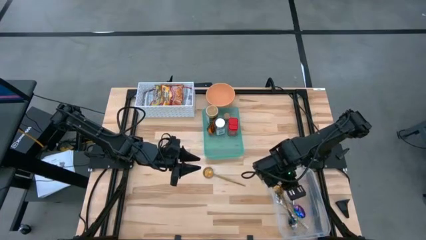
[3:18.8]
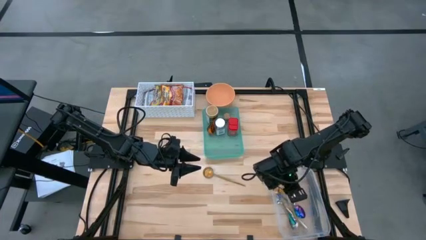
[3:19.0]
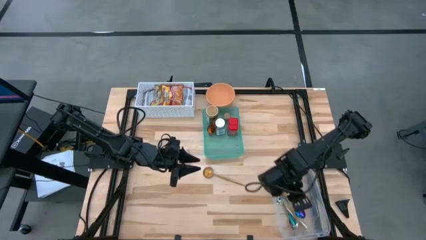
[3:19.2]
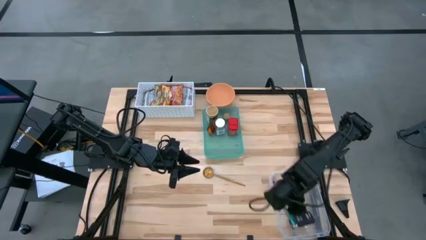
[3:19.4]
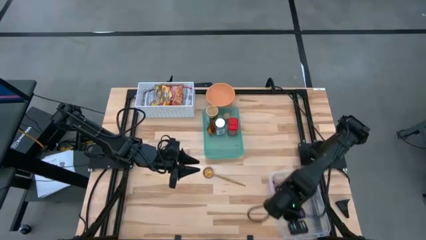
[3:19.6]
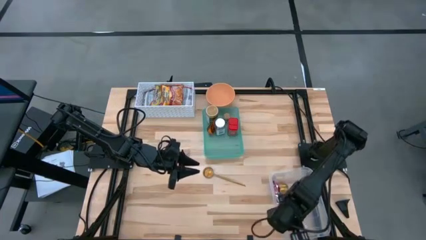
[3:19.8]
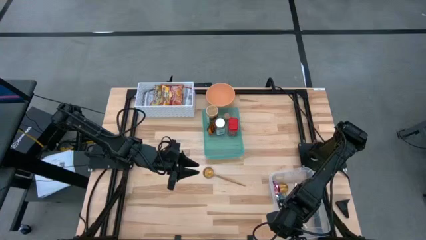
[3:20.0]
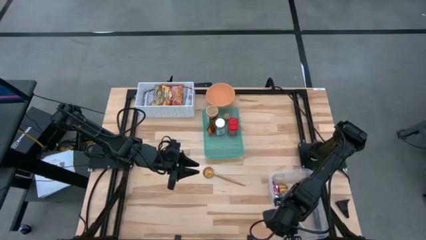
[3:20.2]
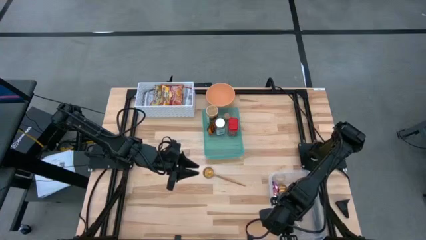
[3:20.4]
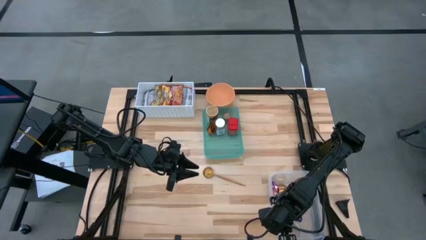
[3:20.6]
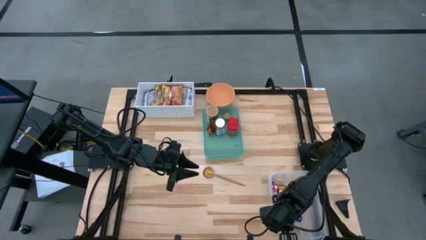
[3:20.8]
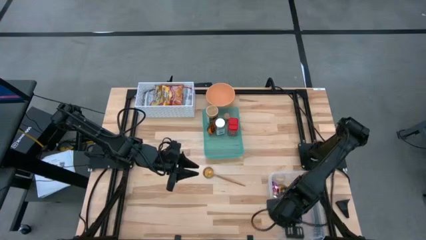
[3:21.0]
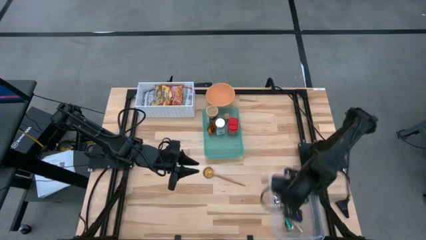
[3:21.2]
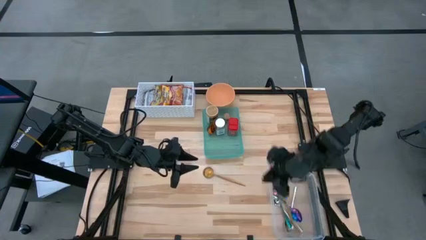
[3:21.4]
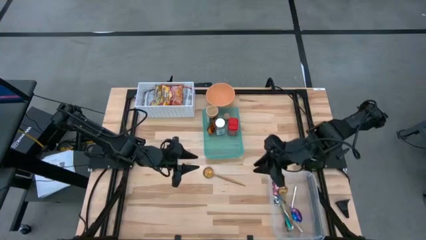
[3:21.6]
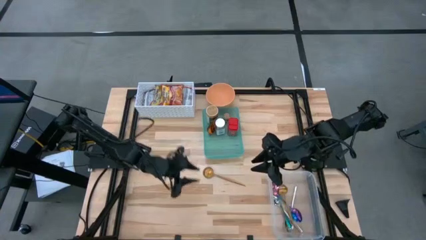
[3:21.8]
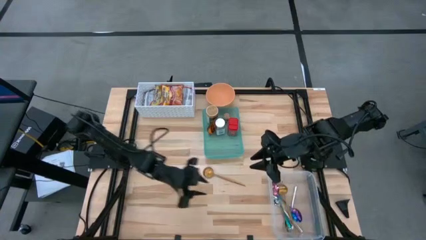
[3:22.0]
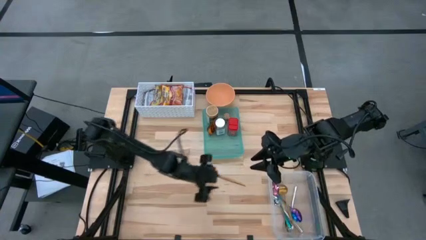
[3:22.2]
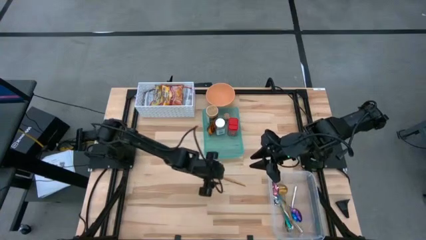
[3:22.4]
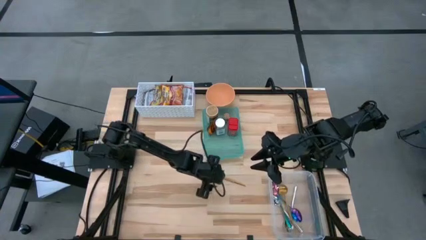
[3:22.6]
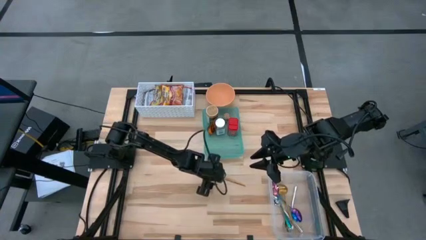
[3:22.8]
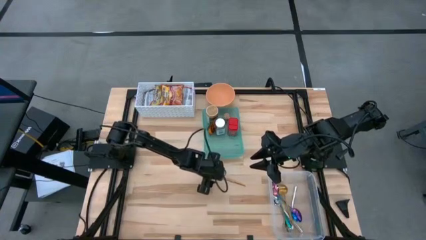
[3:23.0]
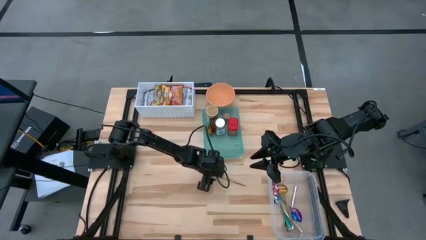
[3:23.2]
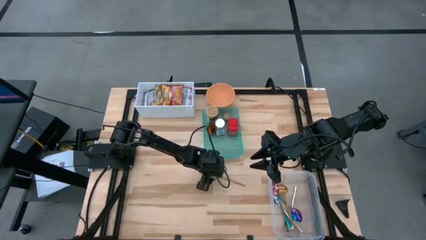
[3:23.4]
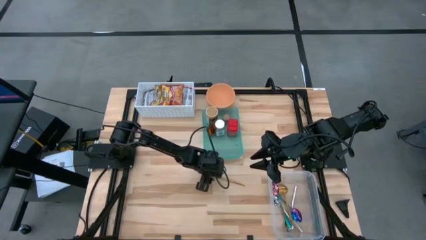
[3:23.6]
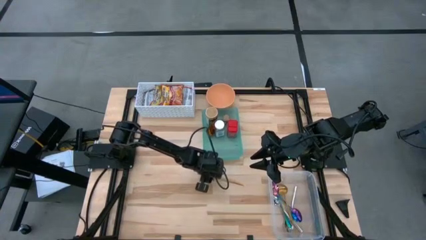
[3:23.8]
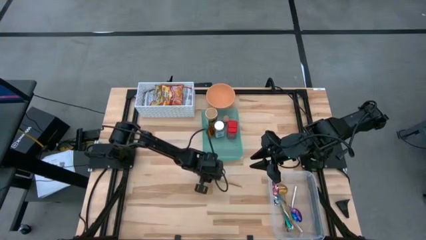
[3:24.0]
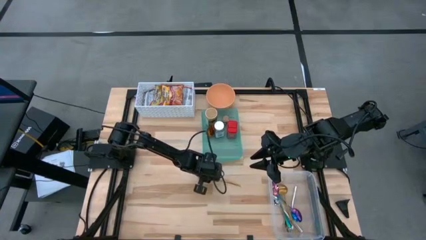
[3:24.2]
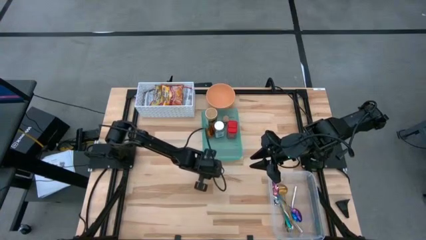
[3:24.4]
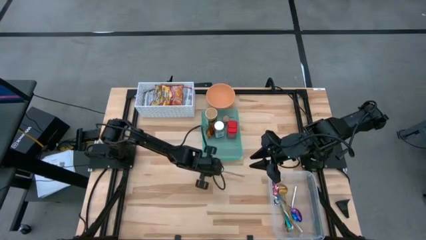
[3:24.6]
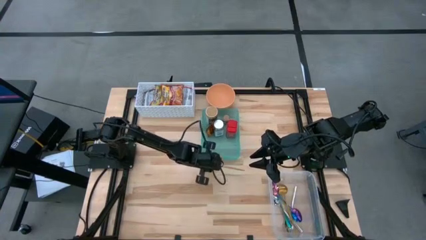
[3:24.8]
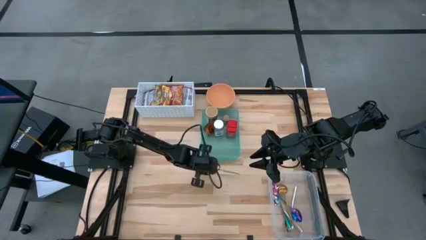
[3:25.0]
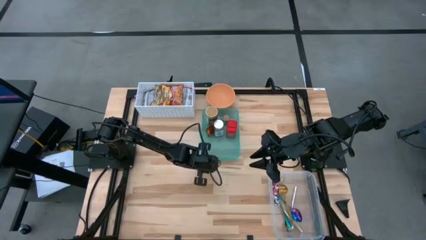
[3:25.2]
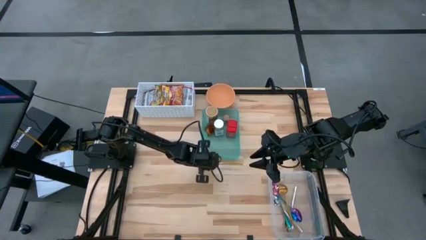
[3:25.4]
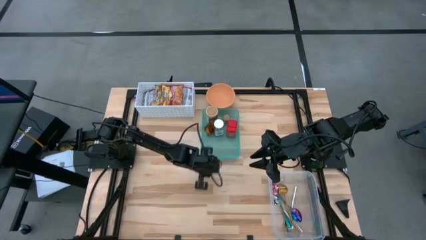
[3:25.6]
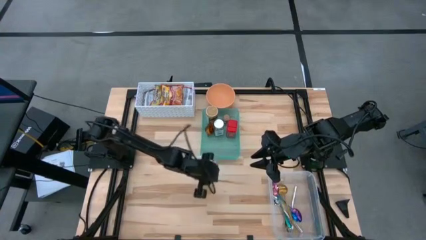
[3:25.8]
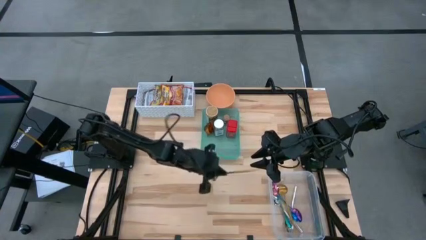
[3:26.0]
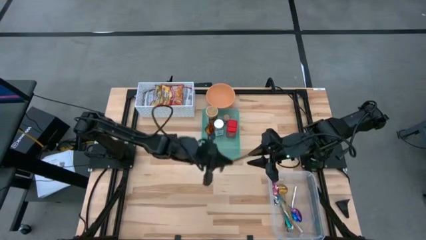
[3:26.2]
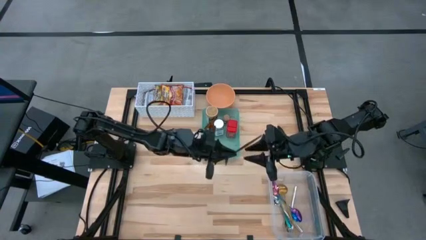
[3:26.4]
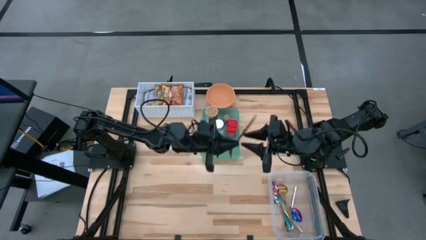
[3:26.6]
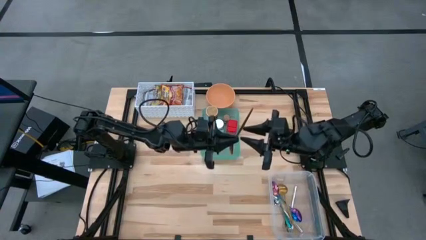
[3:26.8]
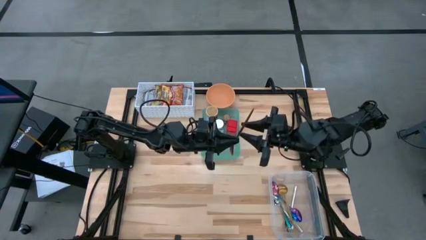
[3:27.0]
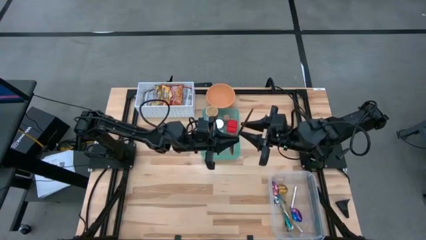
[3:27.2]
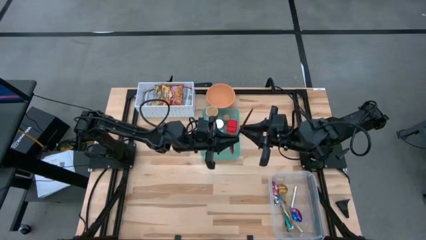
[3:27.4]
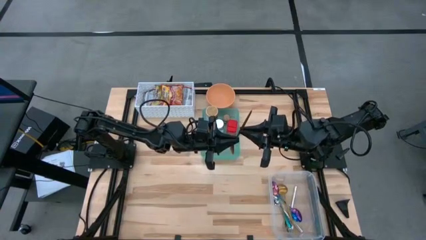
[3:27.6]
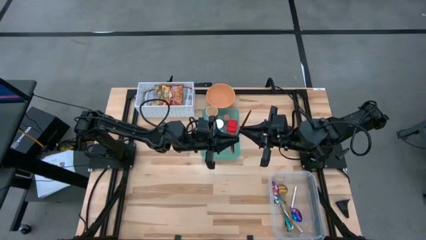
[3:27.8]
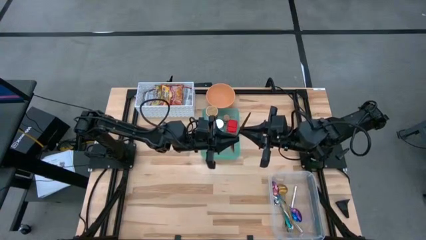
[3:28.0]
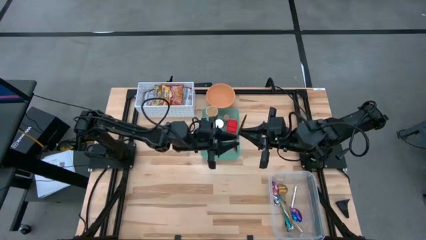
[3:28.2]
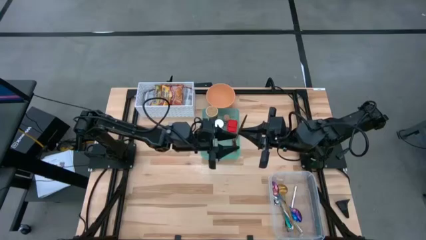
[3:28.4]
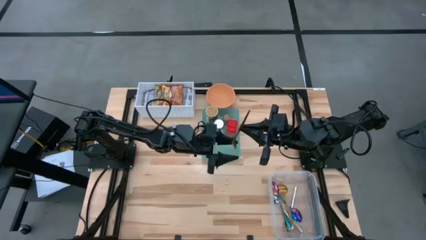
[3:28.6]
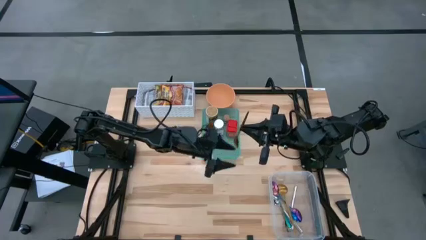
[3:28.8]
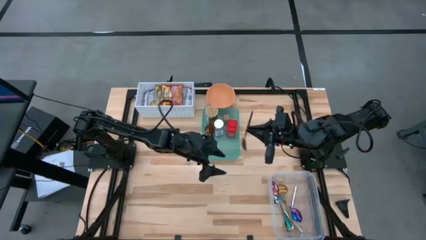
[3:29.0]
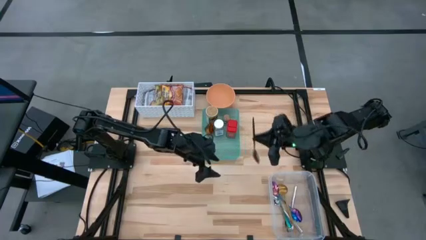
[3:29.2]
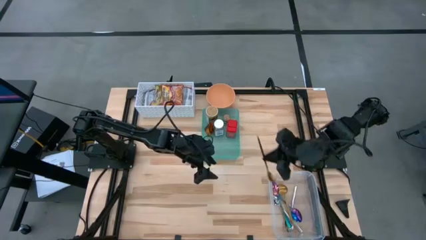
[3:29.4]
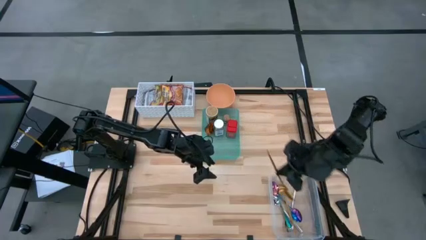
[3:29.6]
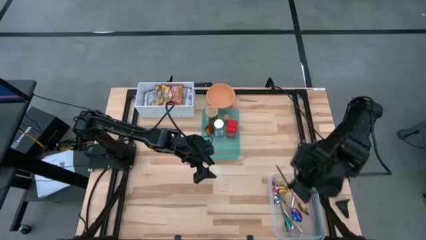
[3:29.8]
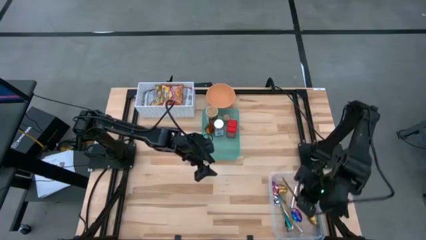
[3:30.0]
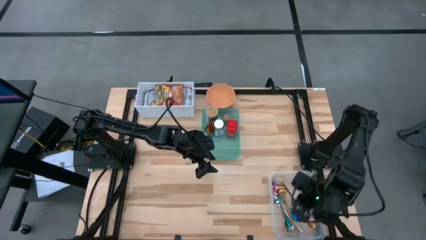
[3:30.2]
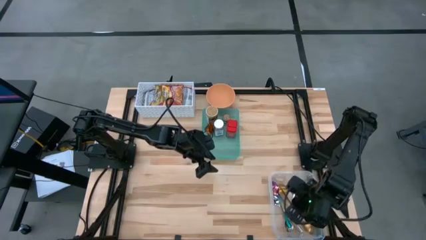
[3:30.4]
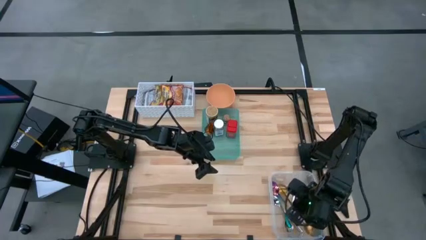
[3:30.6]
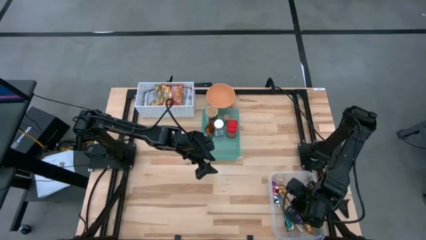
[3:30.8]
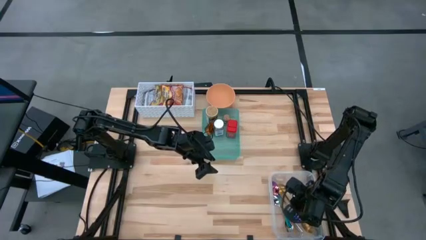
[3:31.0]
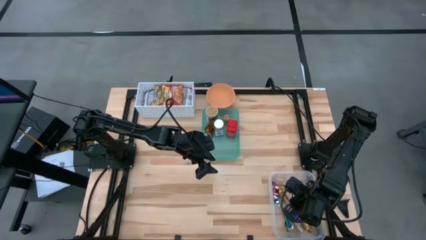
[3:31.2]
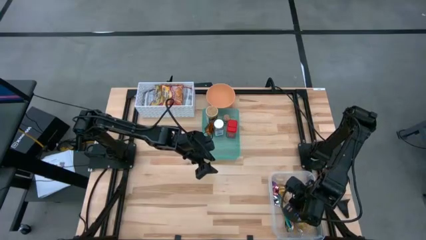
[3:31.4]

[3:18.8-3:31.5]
Task: Pick & Place Food Item
Put the gold spoon into the transparent bin

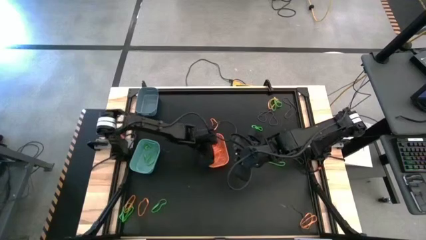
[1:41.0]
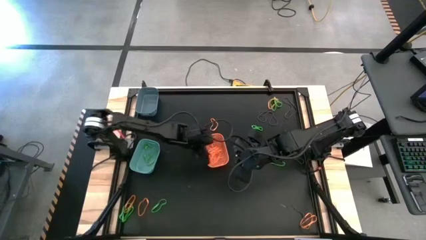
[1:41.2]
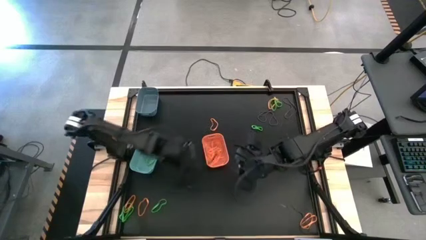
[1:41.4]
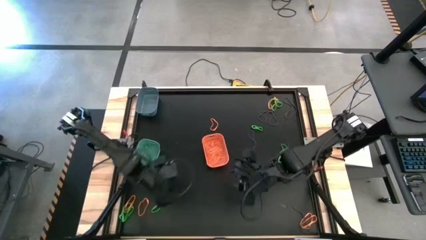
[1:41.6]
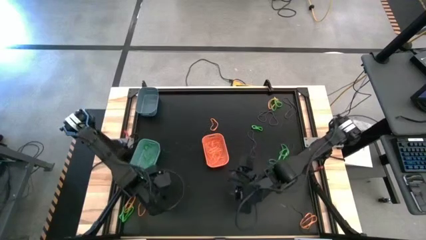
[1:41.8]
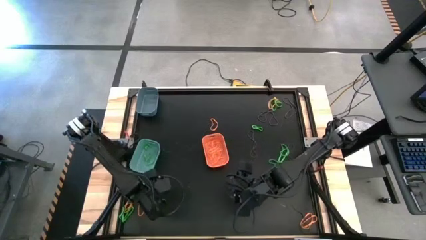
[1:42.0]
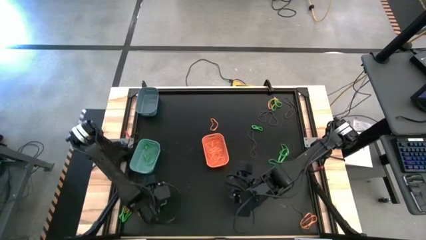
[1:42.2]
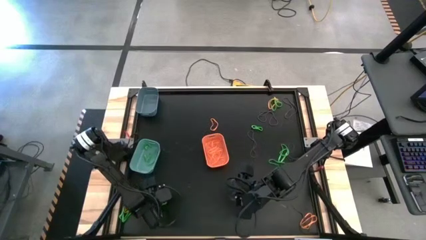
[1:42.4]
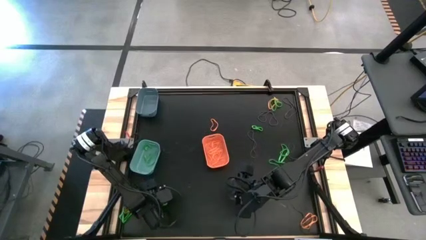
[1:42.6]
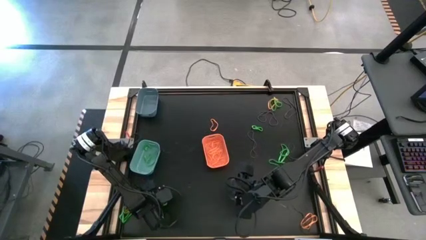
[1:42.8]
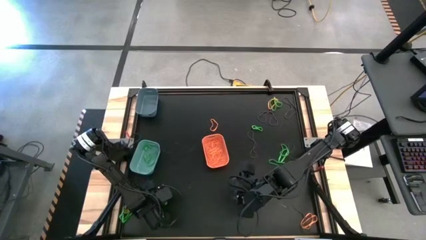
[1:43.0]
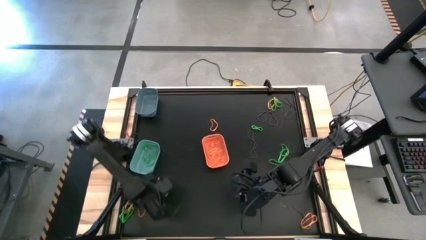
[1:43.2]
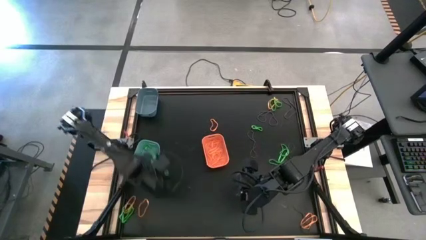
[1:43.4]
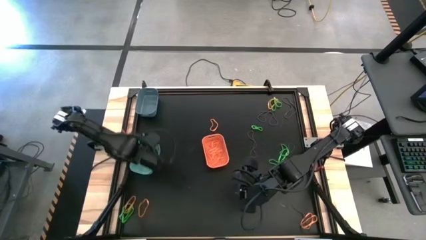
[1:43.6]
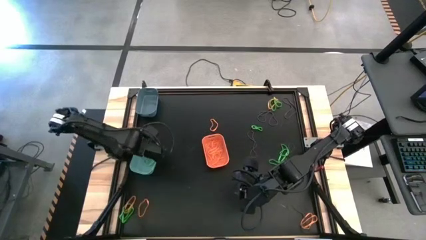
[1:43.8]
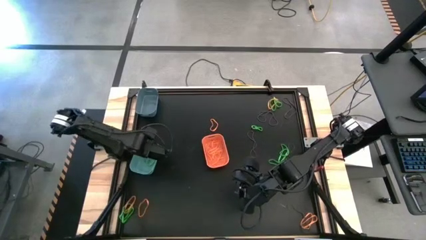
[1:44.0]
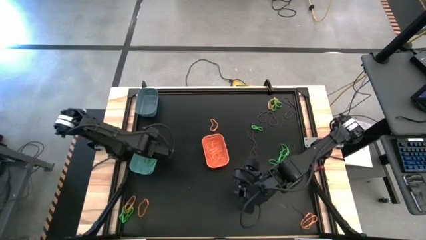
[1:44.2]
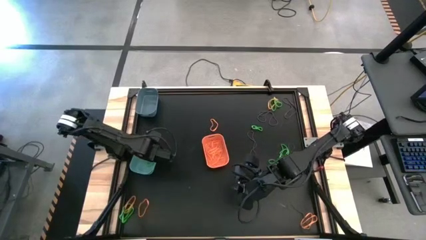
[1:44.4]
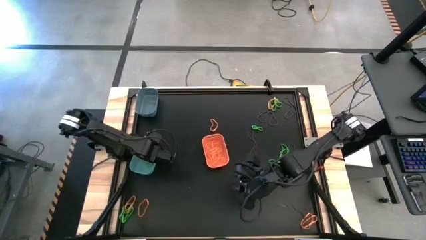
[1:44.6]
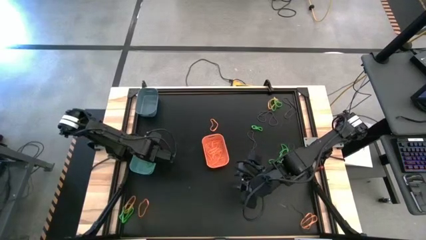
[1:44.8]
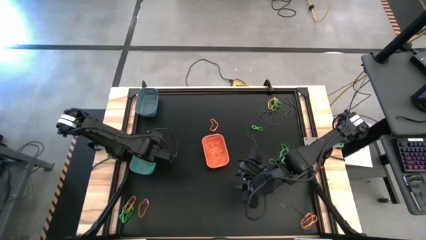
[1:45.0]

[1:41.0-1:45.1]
Task: Sort rubber bands into baskets
Put the green rubber band into the light sea green bin
